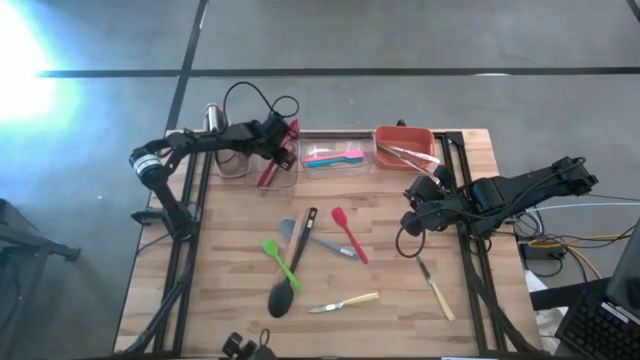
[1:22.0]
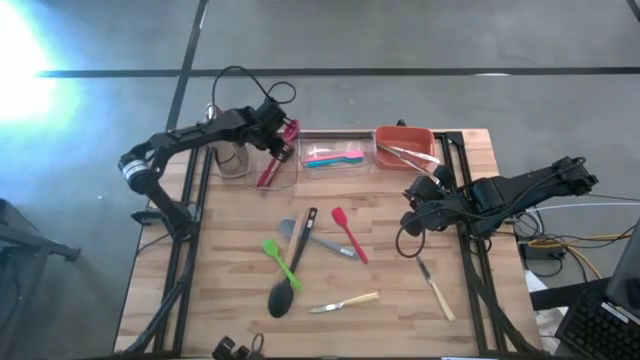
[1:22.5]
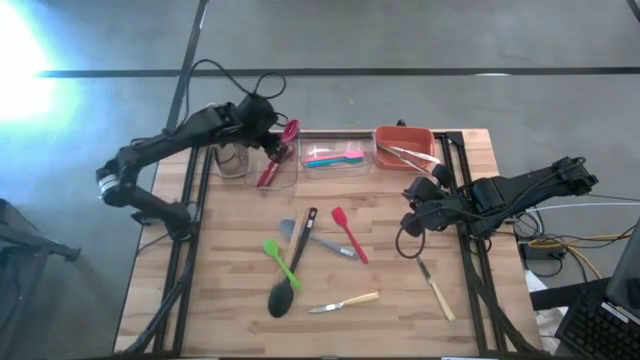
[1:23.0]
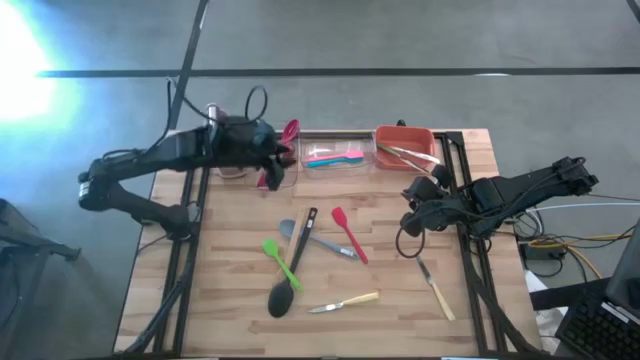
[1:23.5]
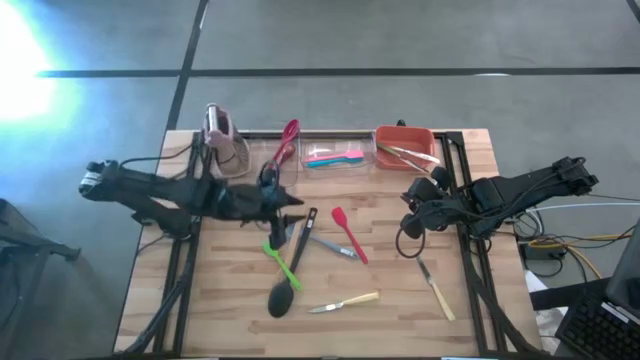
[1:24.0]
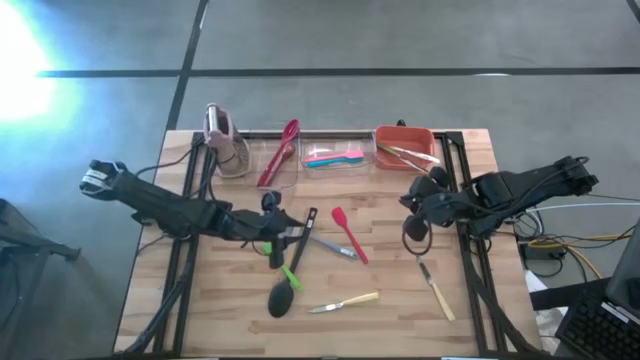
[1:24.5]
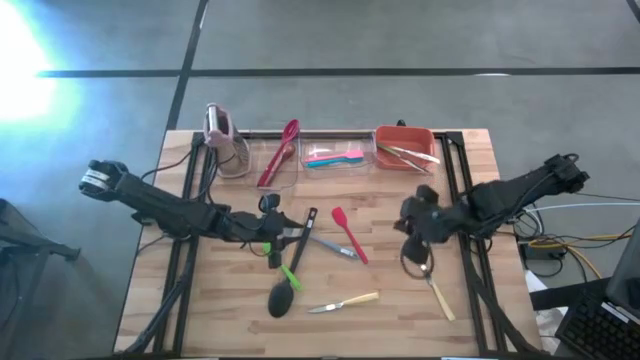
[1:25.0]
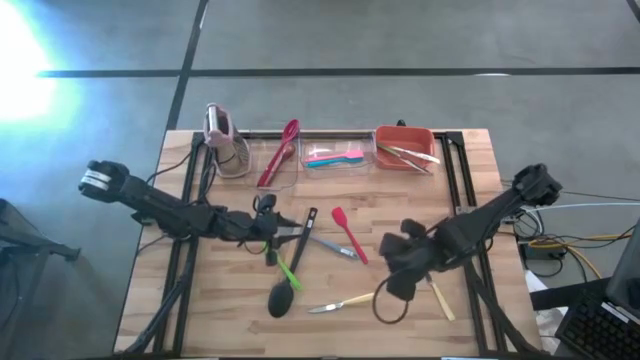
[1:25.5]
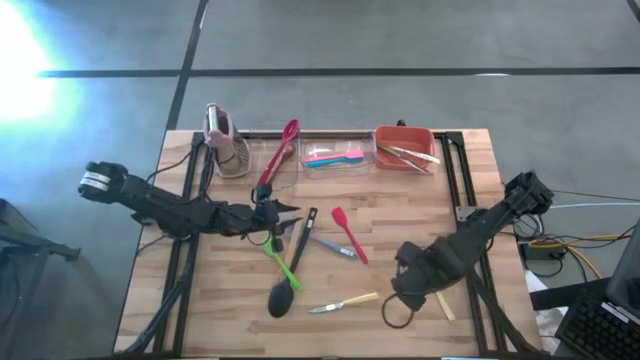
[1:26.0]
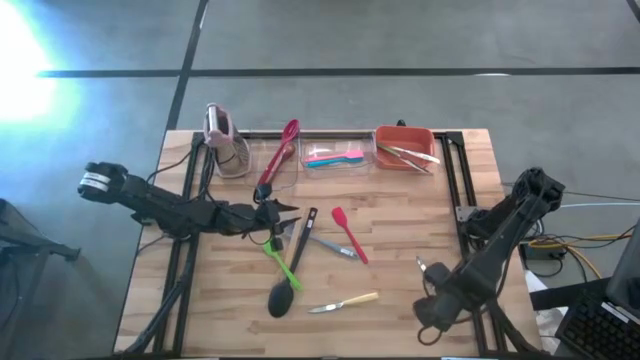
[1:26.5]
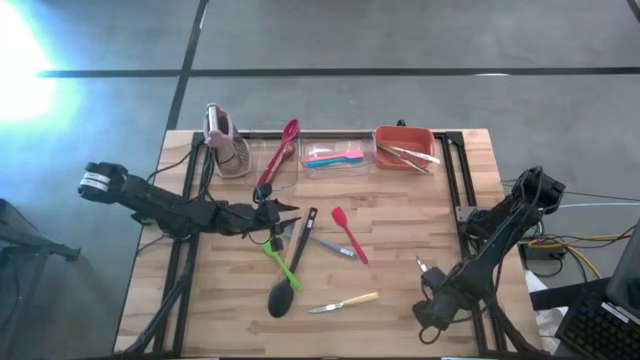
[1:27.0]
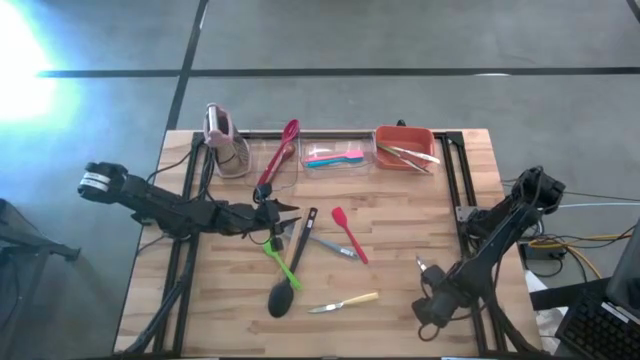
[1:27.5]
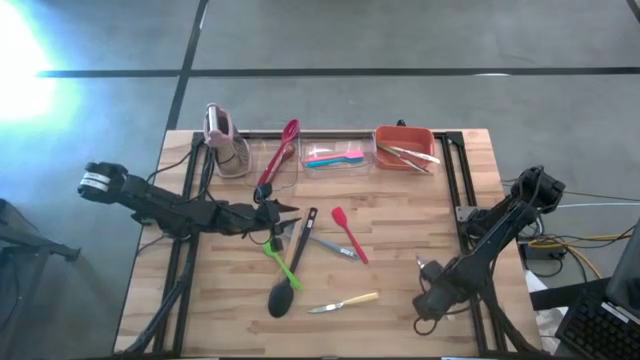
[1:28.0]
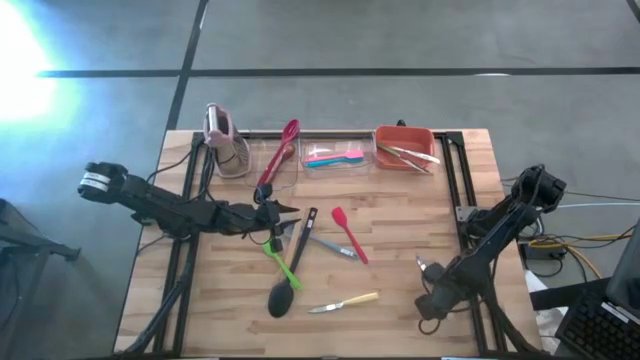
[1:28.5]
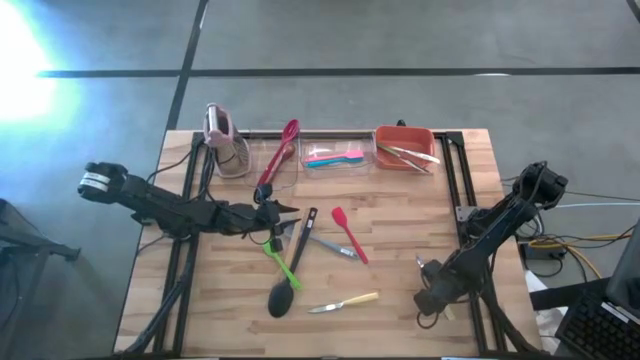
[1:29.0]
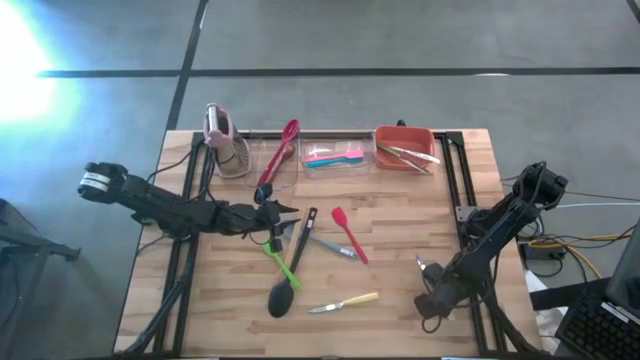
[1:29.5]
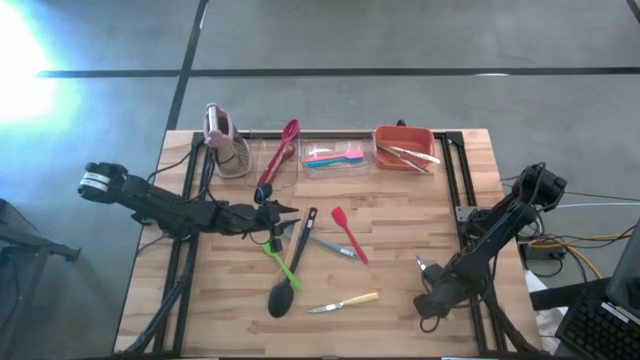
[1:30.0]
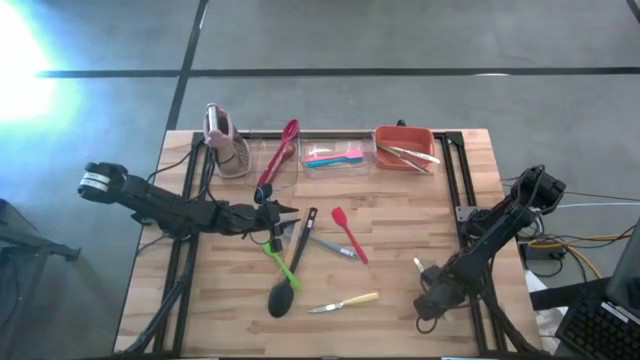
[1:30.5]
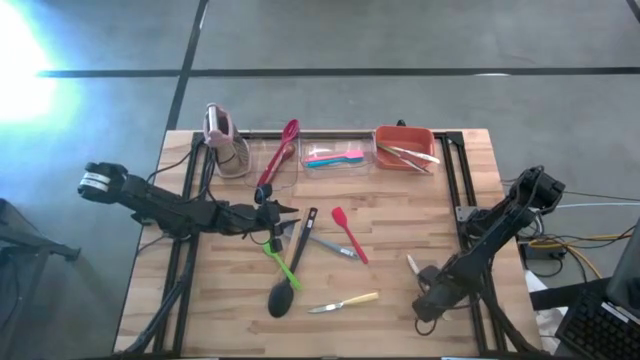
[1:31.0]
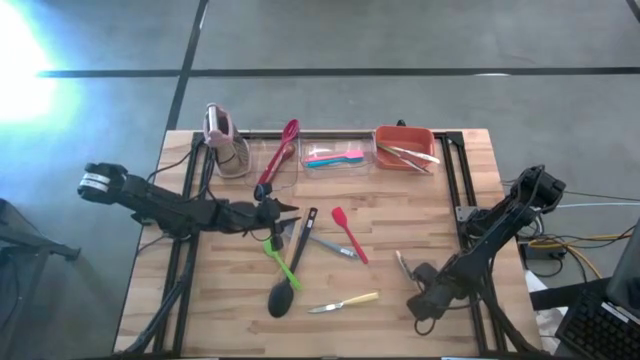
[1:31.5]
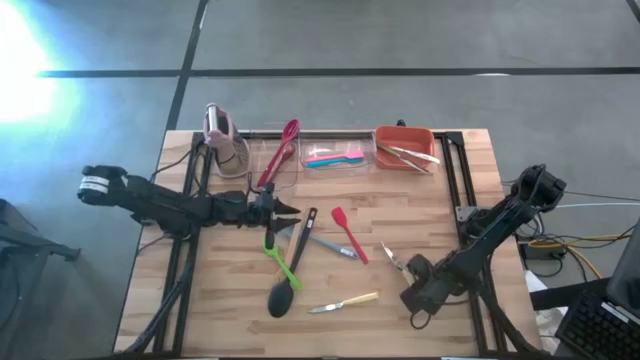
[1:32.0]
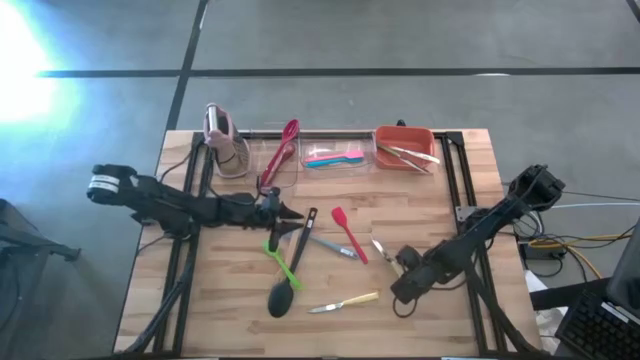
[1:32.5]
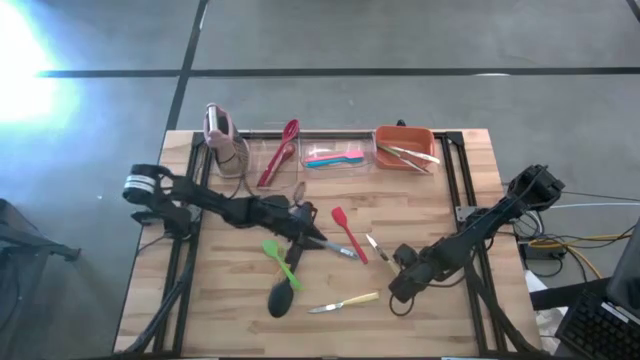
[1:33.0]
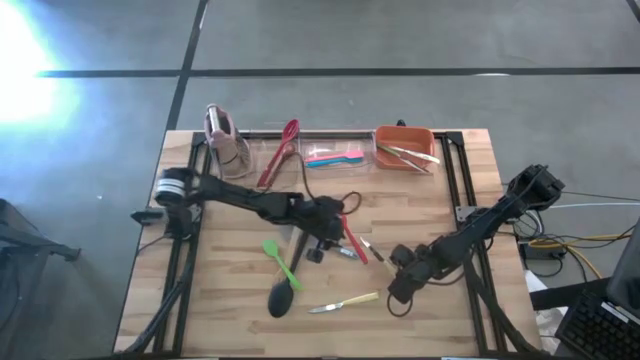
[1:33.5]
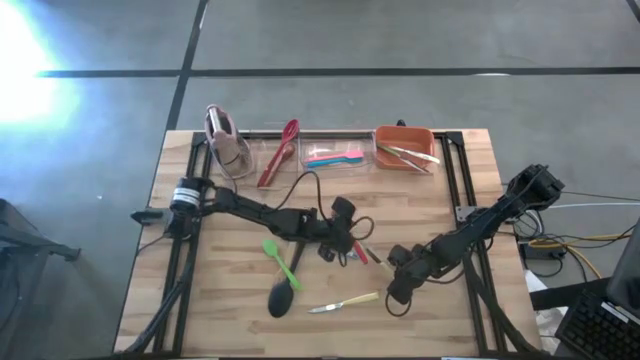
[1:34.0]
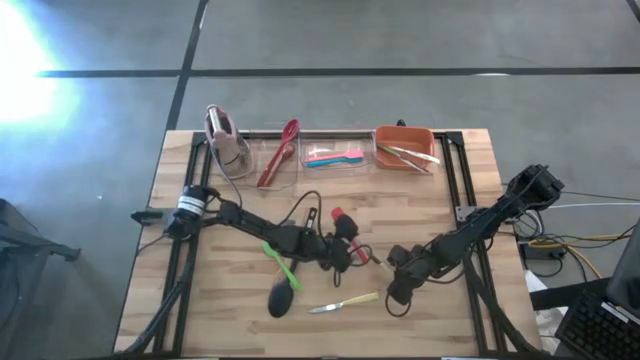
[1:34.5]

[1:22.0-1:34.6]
Task: Pick & Place Kitchen Items
Put the right yellow knife into the orange bin

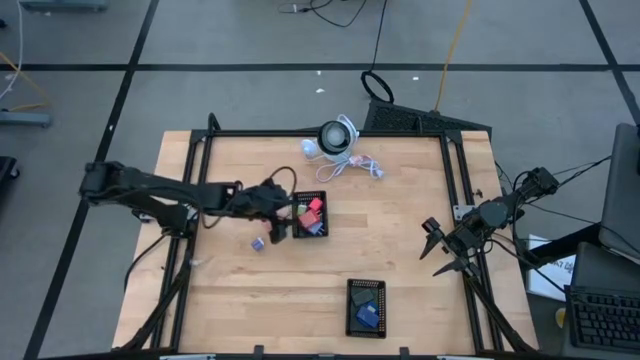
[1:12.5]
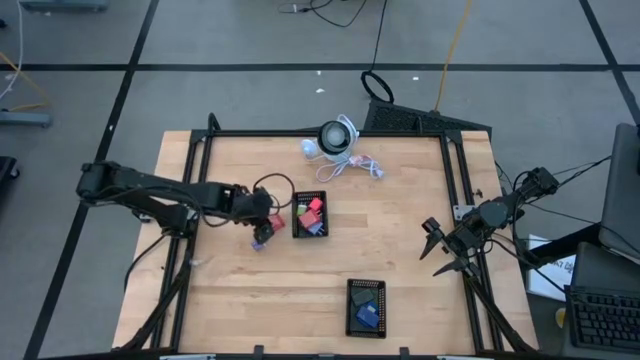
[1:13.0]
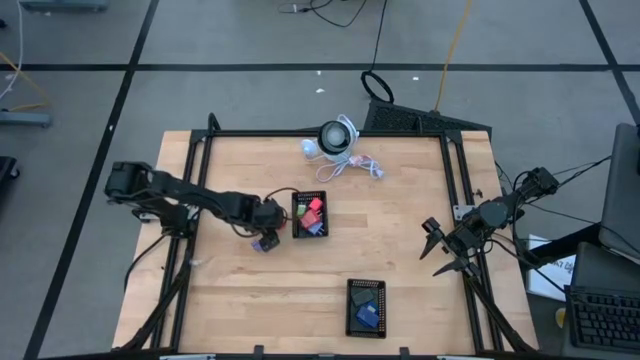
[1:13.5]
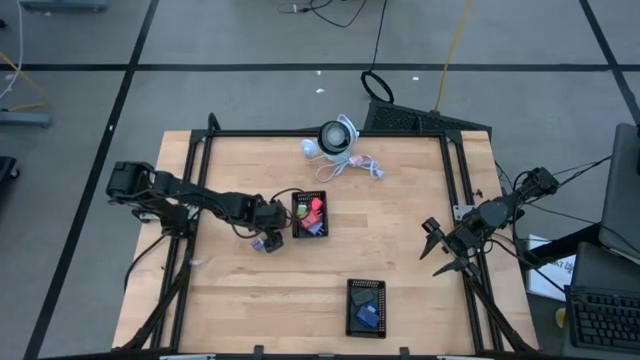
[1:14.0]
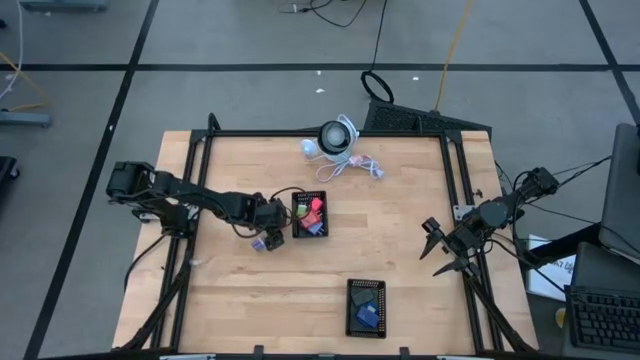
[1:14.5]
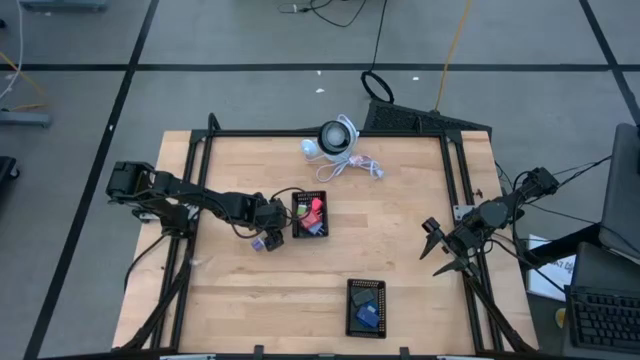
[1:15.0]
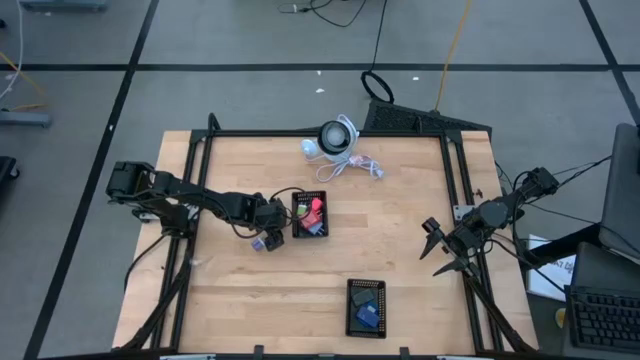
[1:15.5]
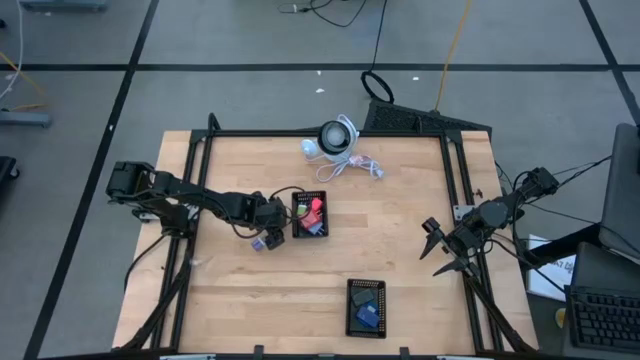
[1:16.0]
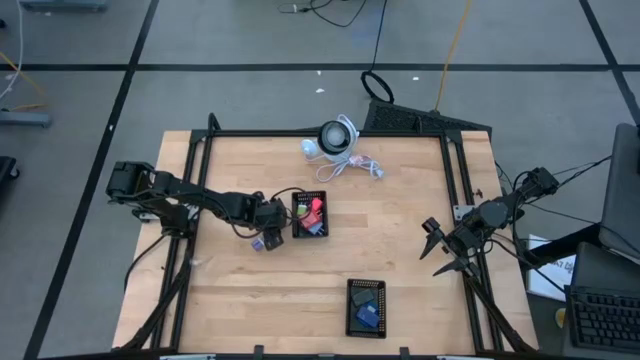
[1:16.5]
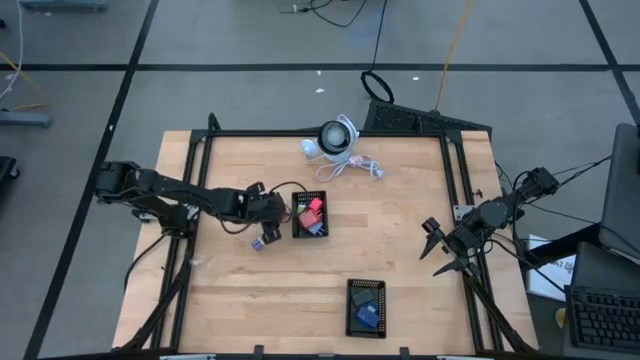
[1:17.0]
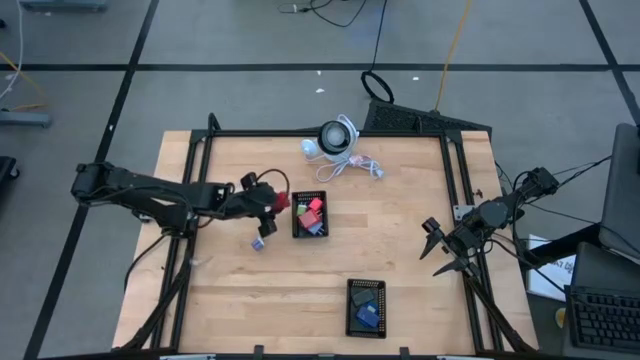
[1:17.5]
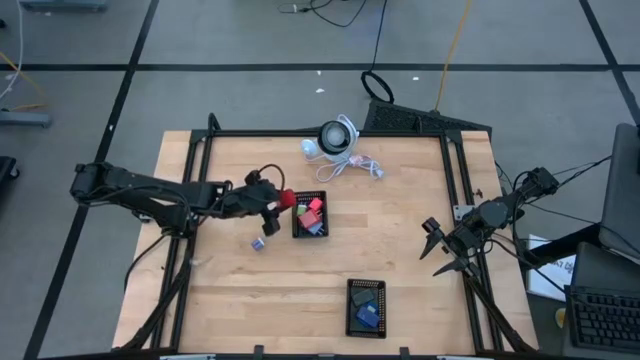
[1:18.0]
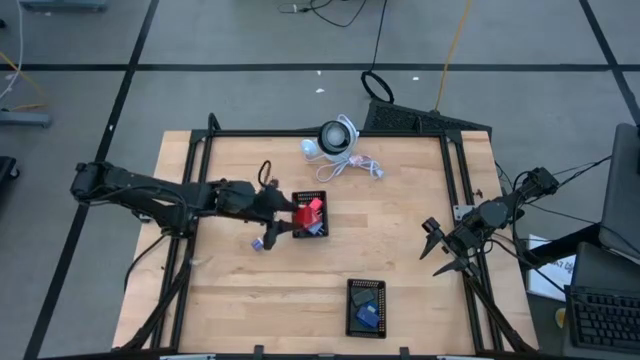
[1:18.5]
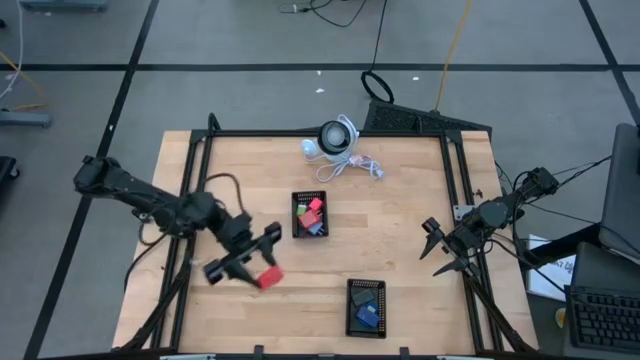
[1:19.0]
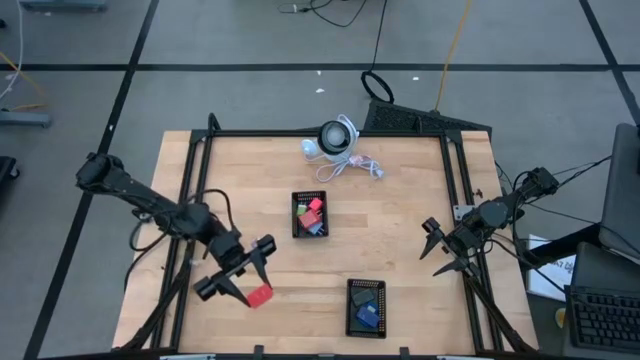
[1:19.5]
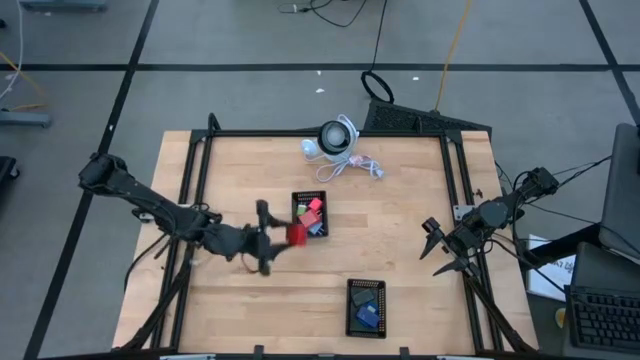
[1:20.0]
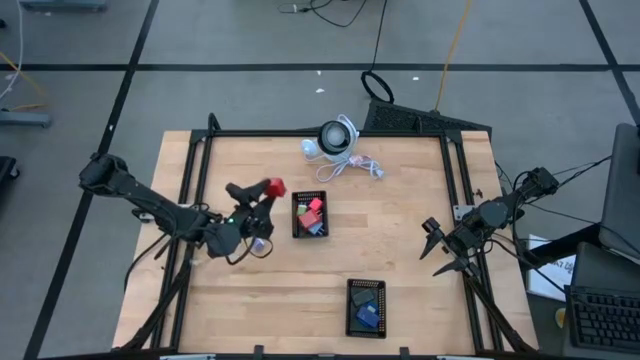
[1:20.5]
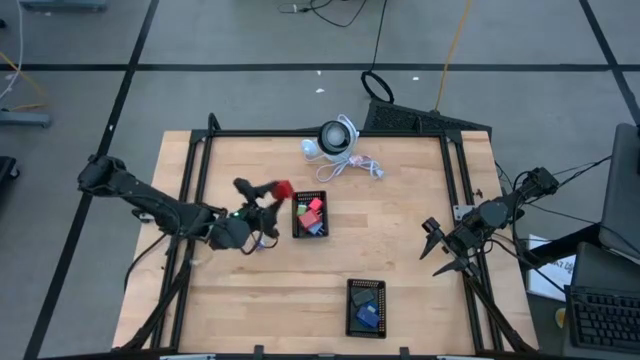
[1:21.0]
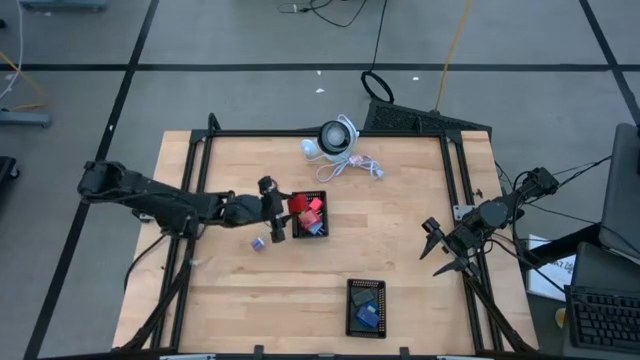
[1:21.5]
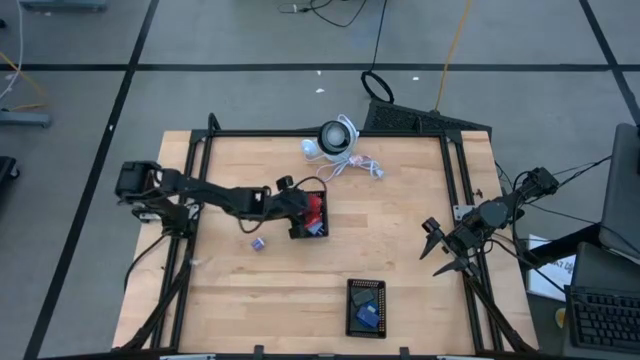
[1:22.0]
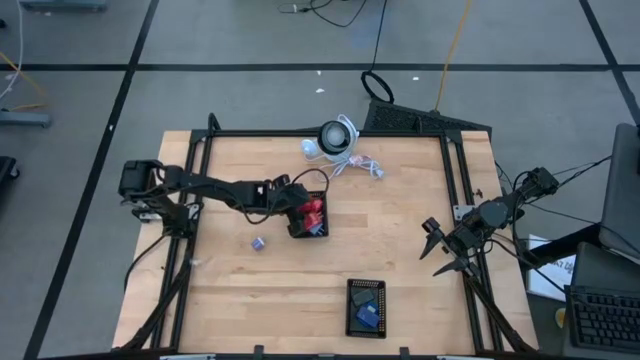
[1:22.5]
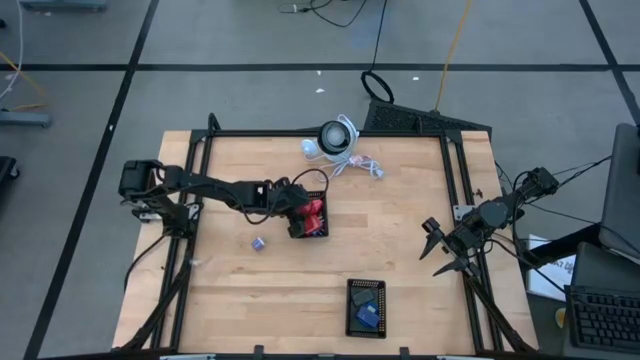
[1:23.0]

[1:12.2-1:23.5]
Task: Pick & Place Office items
Put the red charger into the top black basket
